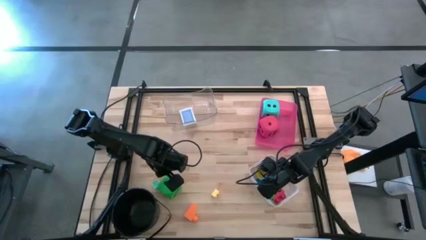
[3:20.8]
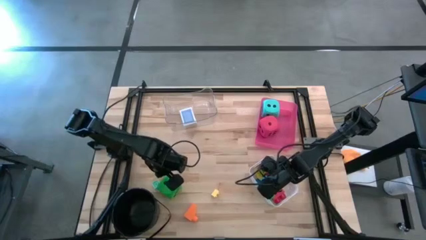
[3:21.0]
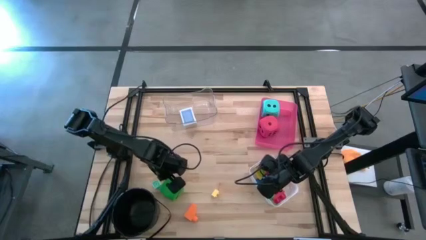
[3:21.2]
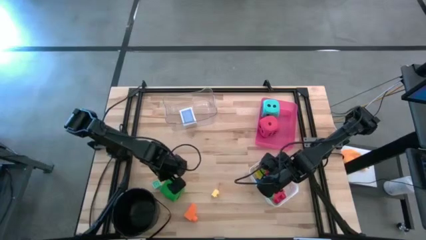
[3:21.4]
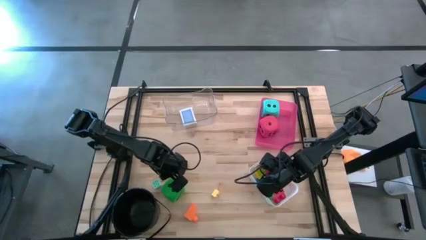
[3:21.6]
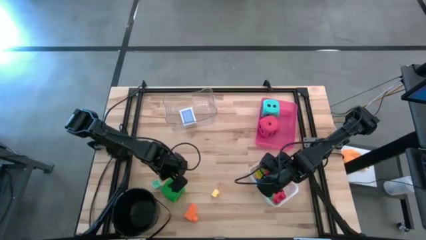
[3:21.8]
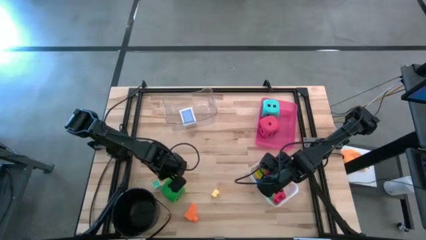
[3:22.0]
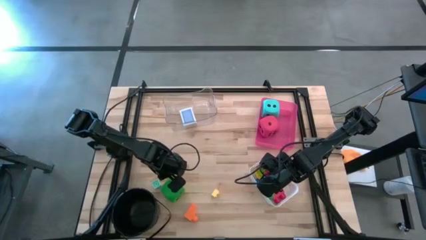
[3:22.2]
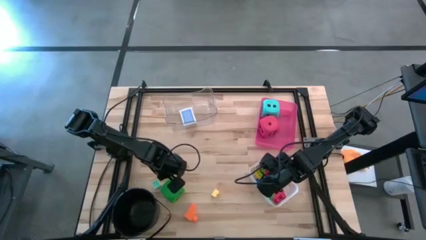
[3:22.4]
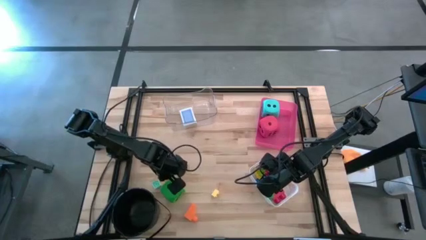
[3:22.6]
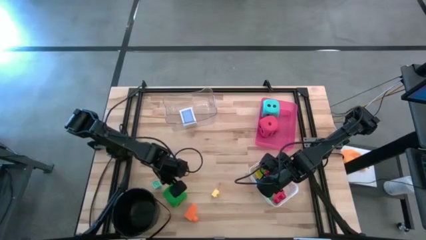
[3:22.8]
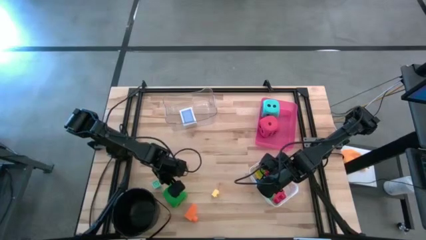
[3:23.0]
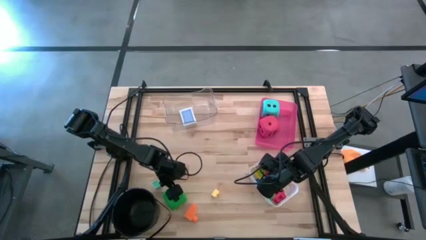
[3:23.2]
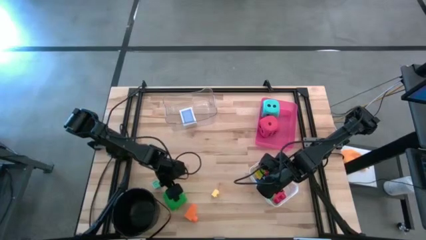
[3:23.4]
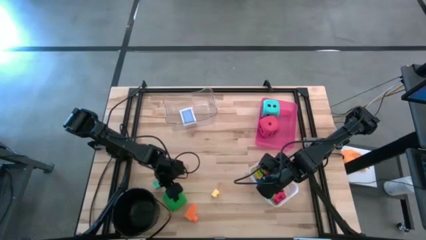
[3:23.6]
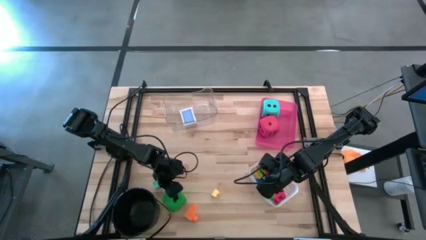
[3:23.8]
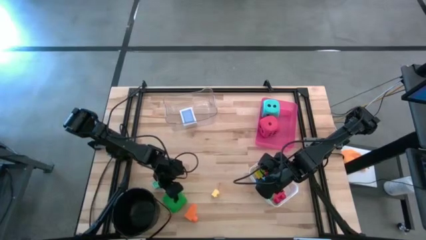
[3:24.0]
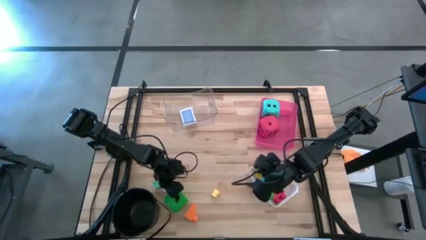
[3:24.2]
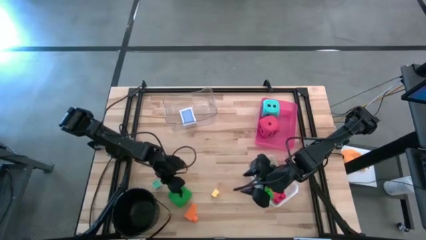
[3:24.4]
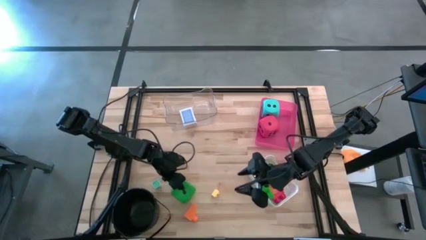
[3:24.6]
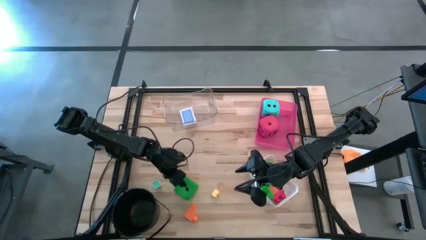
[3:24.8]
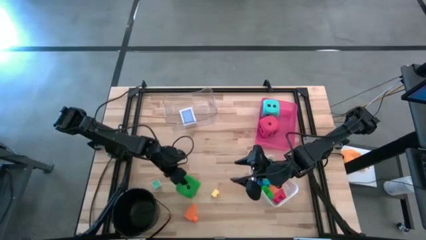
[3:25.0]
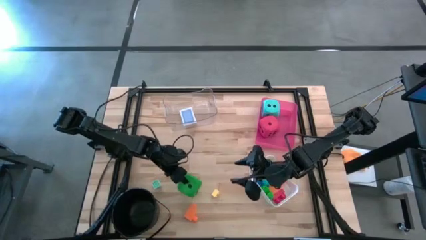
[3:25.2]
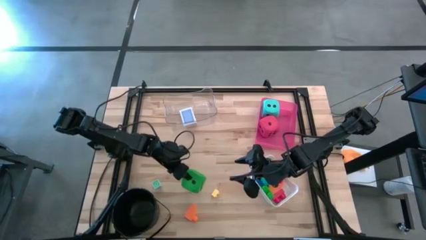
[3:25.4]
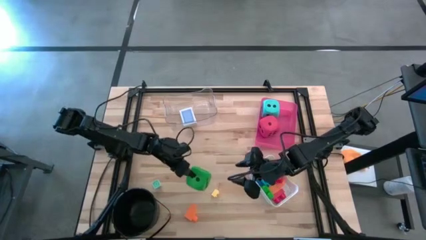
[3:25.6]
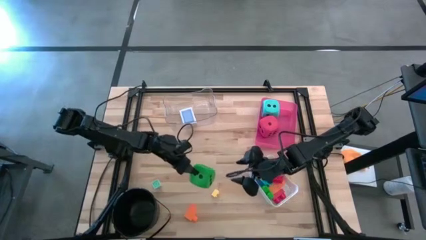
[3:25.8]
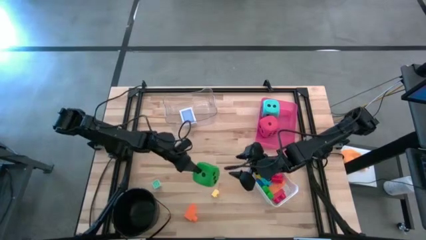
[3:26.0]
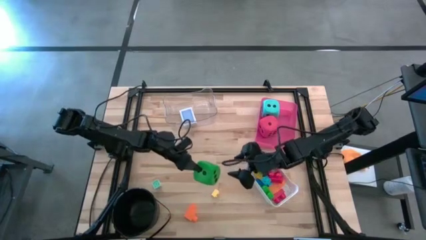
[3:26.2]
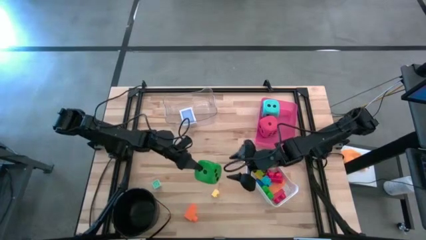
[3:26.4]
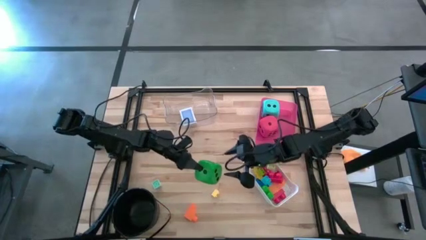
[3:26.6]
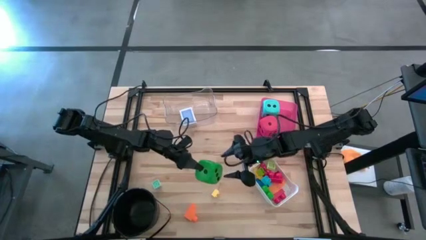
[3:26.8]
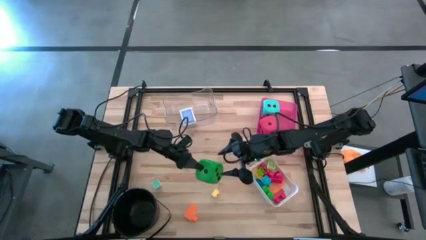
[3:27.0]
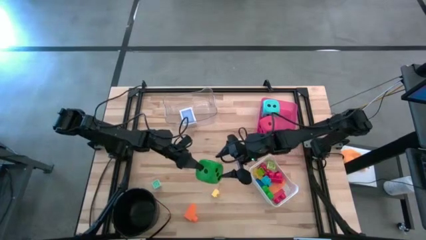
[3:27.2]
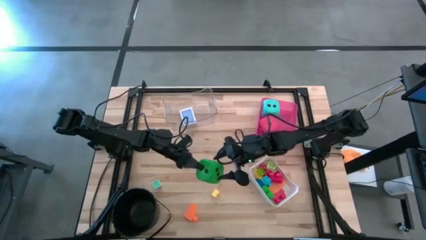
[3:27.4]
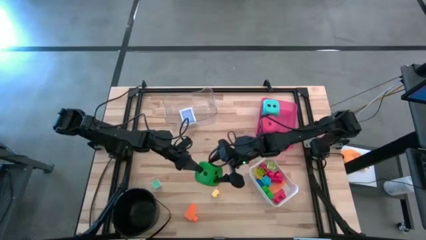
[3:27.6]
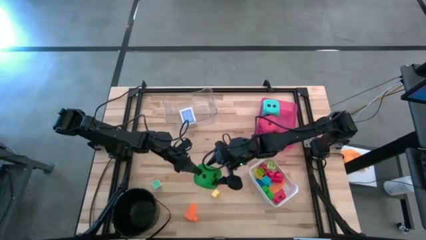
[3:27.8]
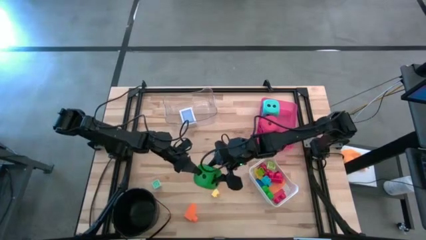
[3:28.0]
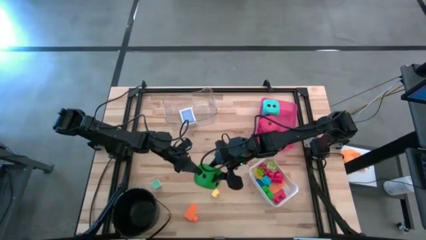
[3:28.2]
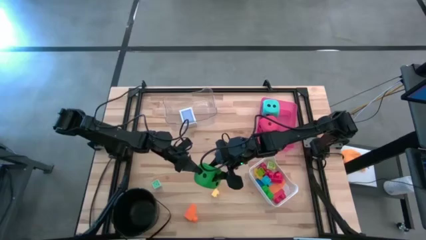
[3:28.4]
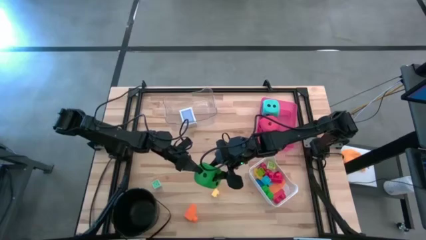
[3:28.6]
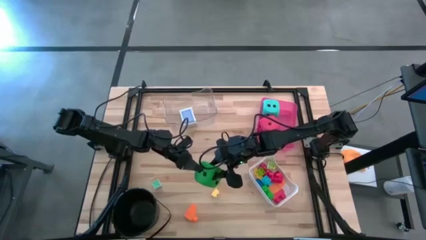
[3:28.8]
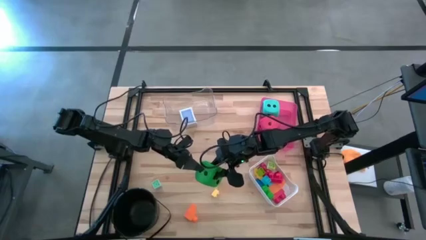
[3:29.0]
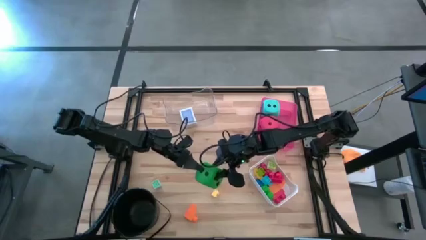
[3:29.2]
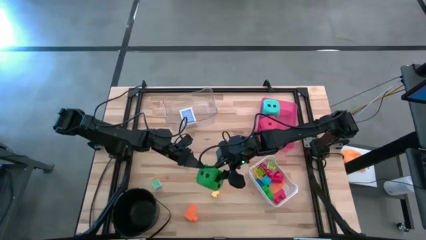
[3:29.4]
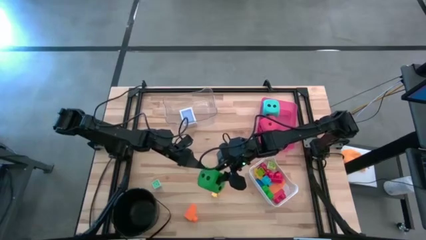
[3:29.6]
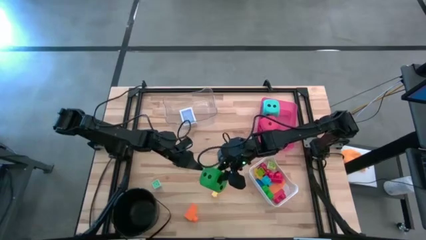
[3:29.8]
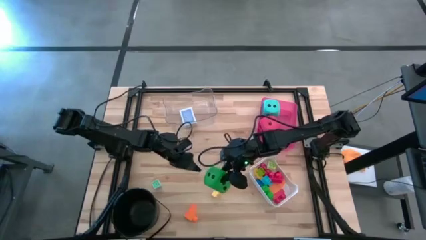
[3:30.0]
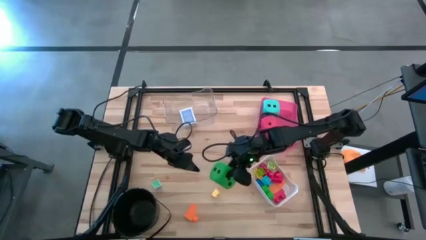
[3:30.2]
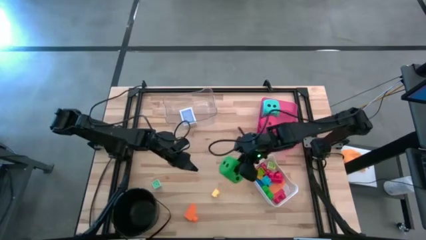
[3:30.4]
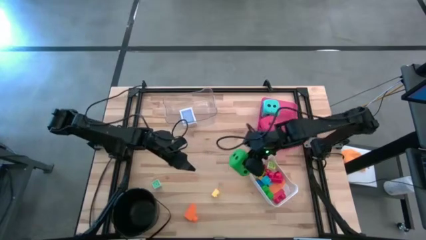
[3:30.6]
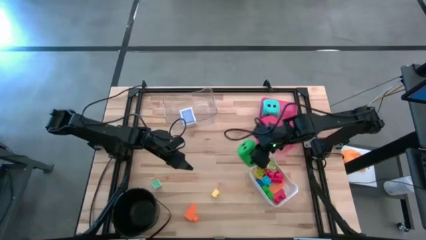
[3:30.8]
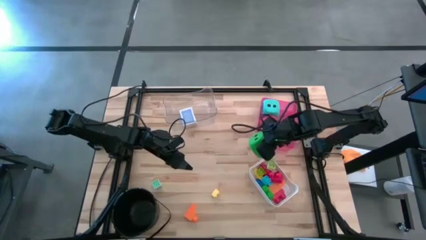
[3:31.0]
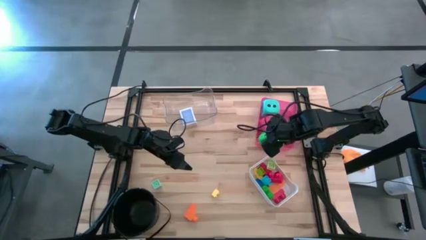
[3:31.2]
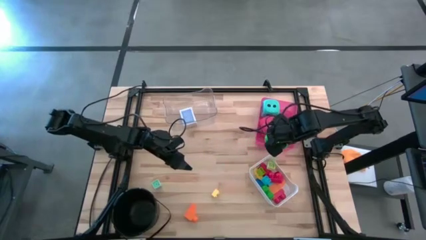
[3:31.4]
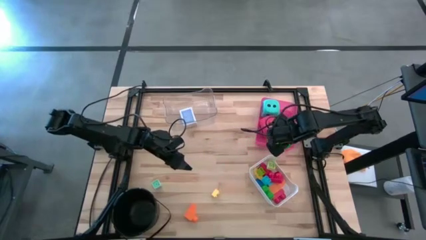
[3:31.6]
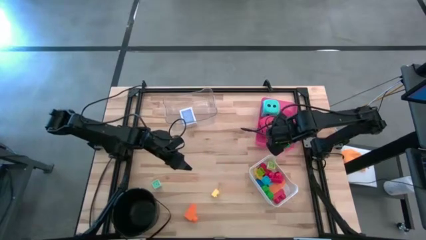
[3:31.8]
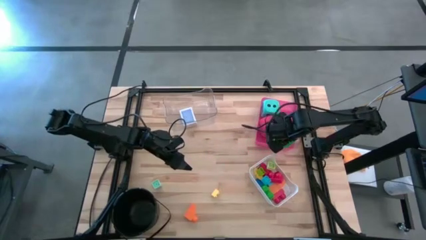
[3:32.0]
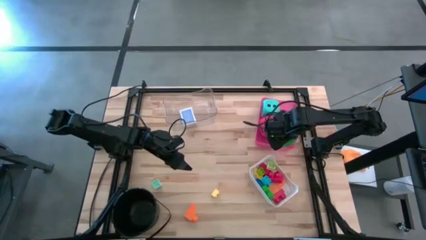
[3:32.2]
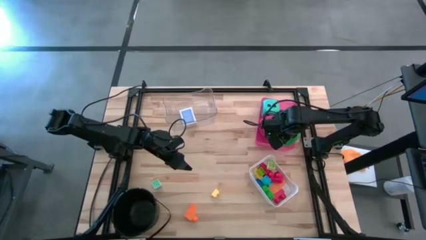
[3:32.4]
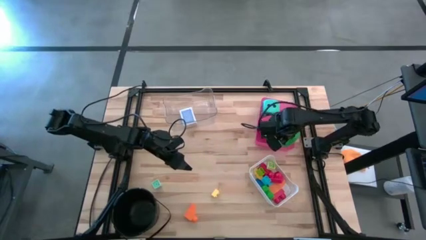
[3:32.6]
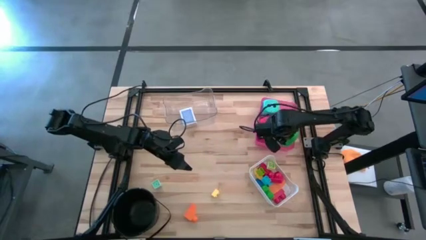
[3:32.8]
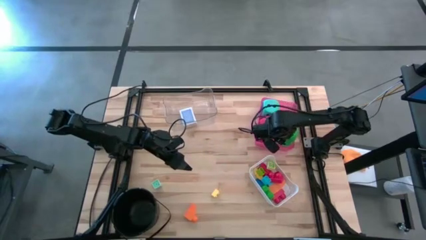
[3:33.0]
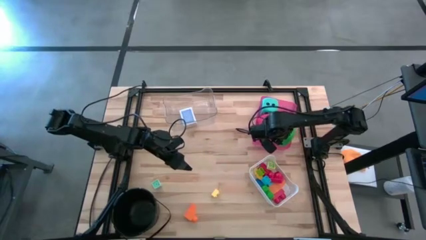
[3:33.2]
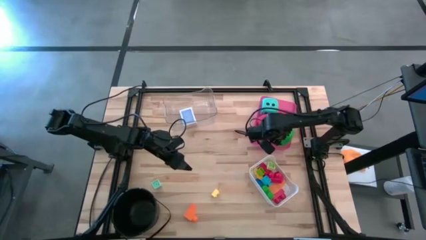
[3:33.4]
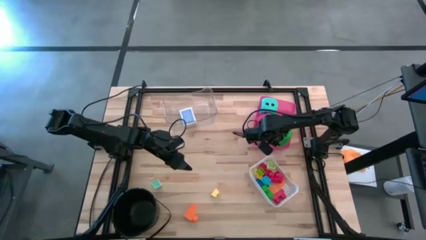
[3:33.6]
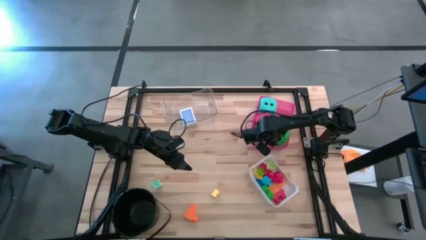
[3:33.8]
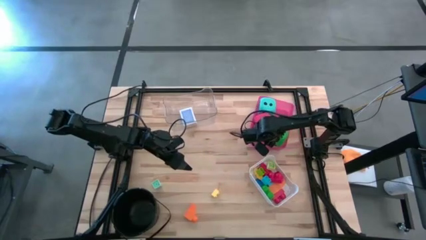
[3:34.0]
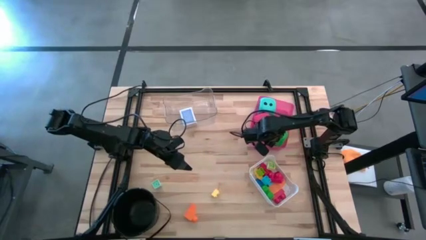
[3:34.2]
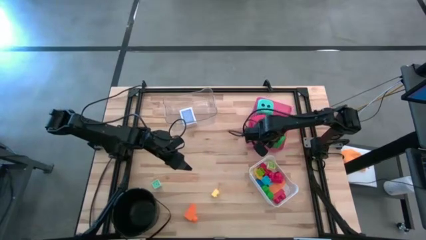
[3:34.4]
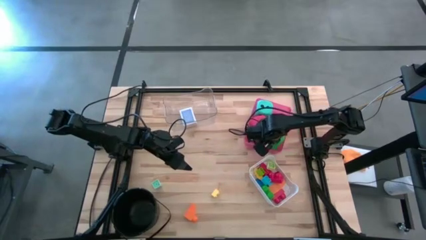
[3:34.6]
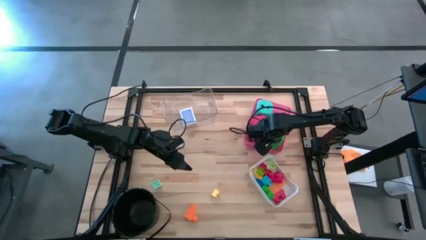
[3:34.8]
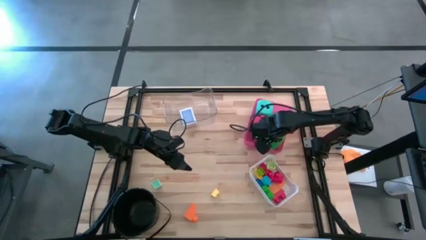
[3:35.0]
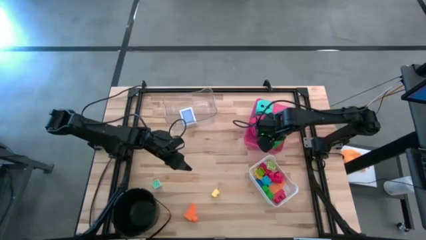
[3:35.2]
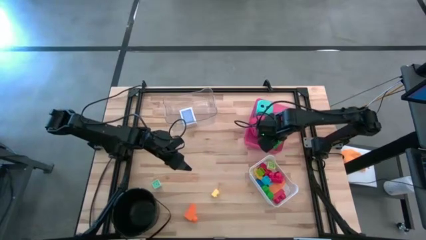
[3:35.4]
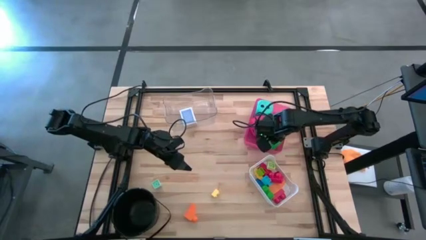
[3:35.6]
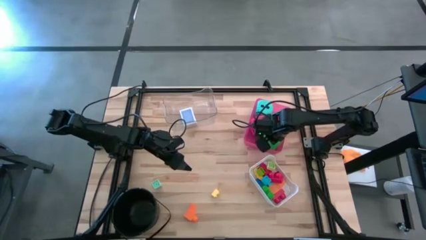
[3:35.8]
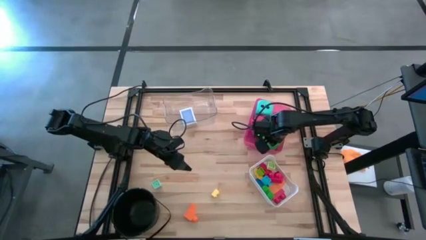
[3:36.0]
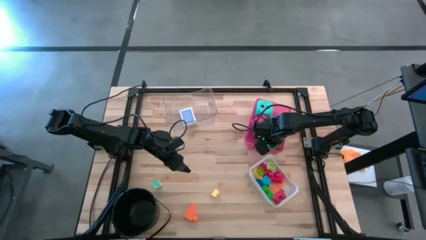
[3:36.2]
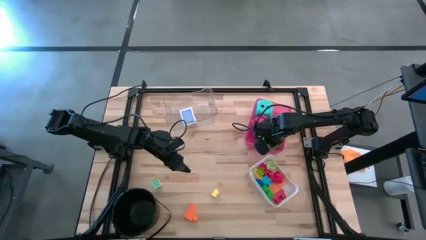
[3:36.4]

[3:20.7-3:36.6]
Task: Pick & Place Toys
Put the green dice into the red bin
